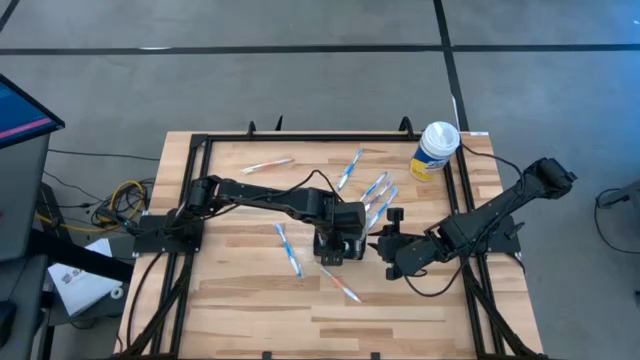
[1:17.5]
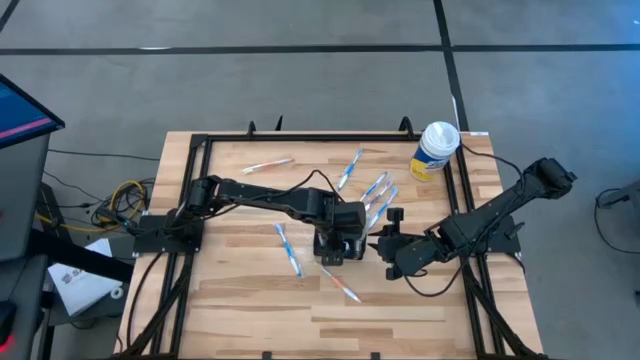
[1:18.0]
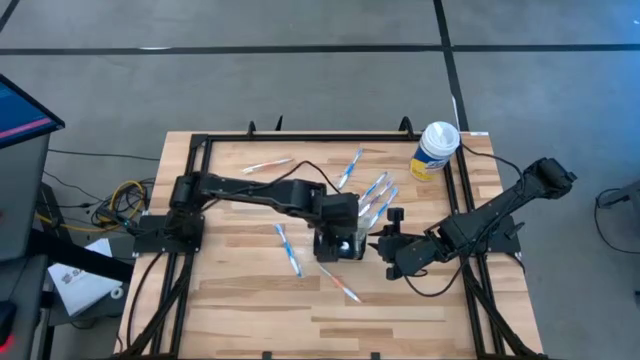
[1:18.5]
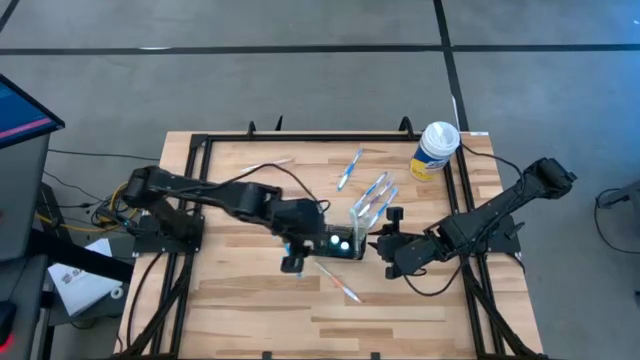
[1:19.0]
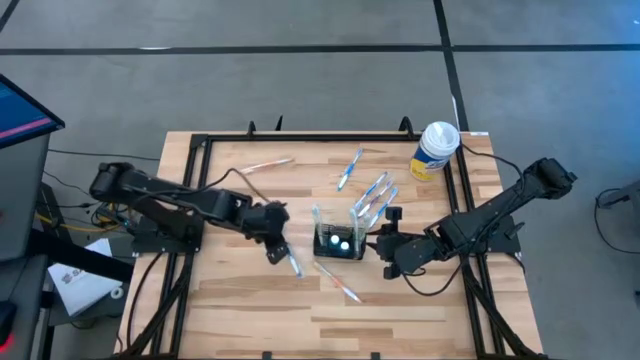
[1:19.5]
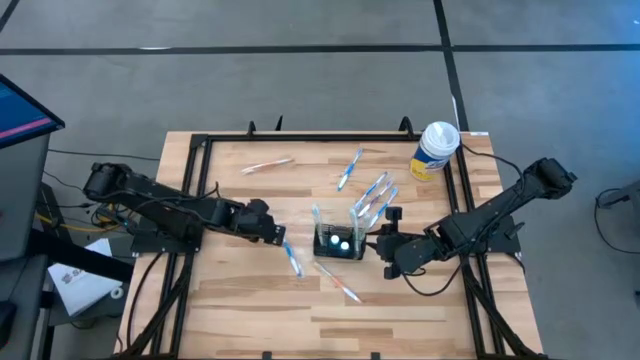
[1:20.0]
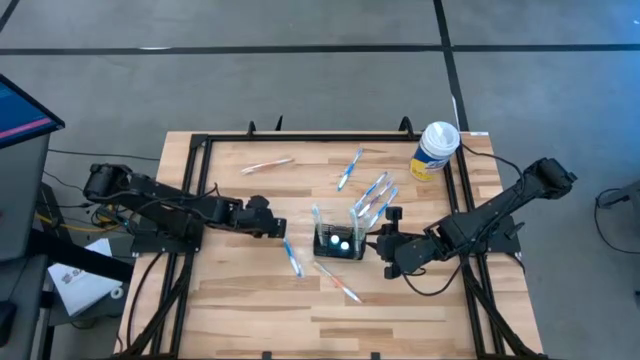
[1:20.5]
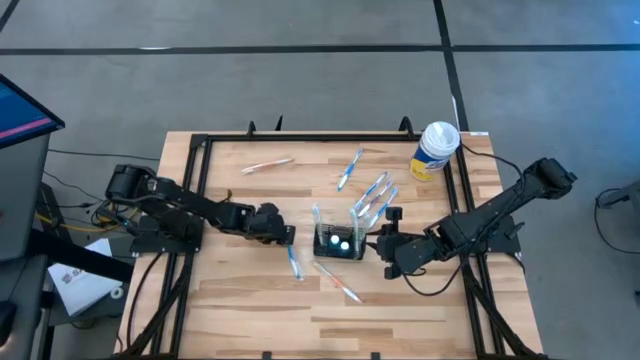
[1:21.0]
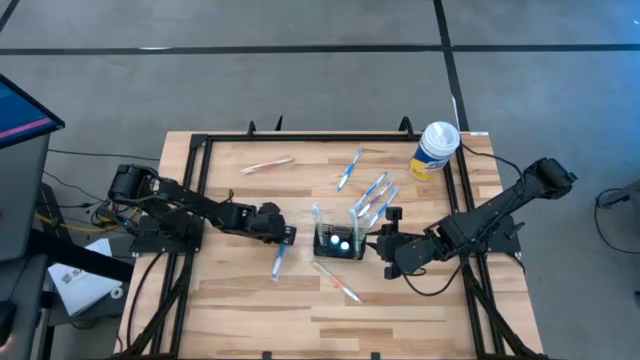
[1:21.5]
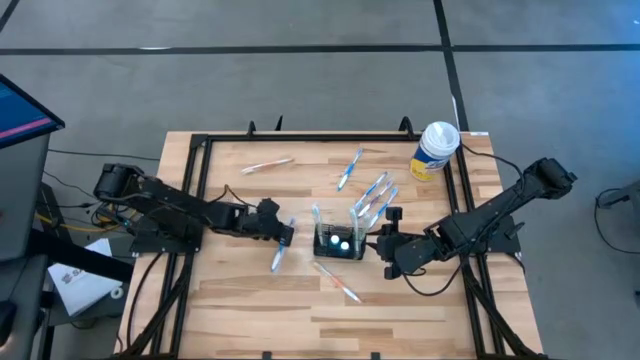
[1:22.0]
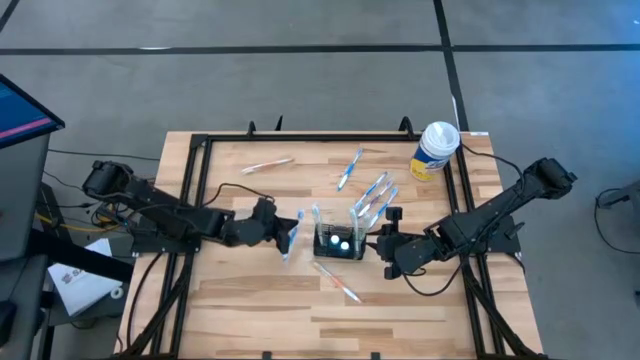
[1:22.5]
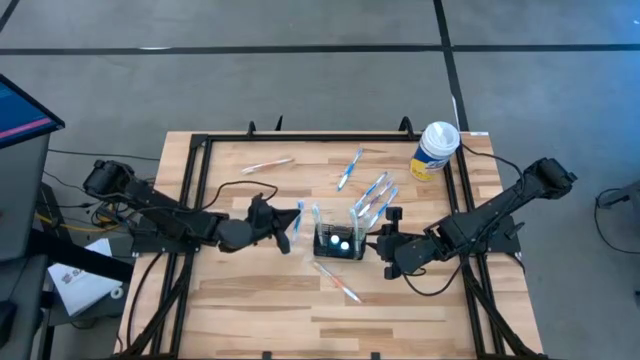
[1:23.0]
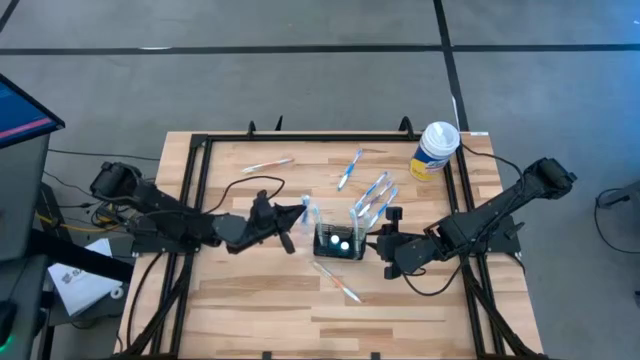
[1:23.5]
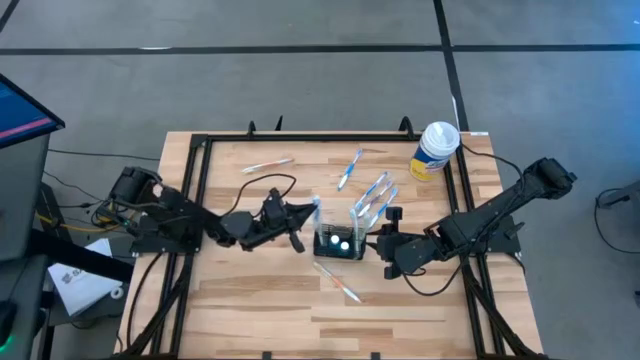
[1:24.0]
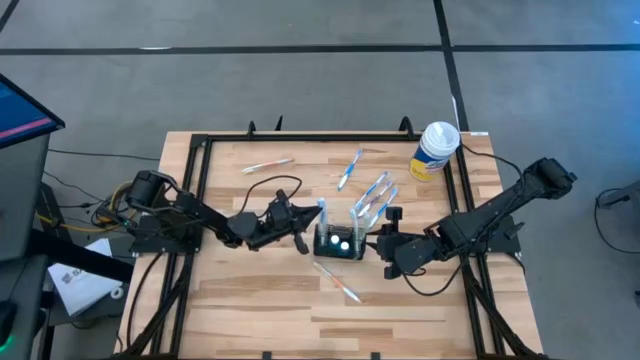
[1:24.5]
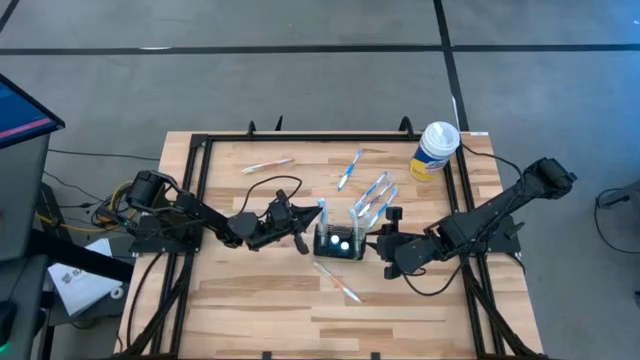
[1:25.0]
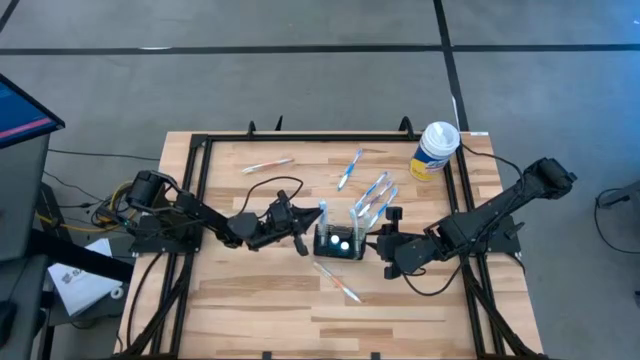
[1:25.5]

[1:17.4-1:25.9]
Task: Pick & Place toothbrushing station
Put the blue toothbrush into the wire organizer

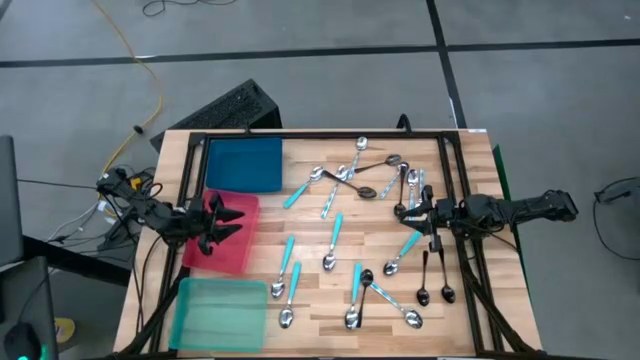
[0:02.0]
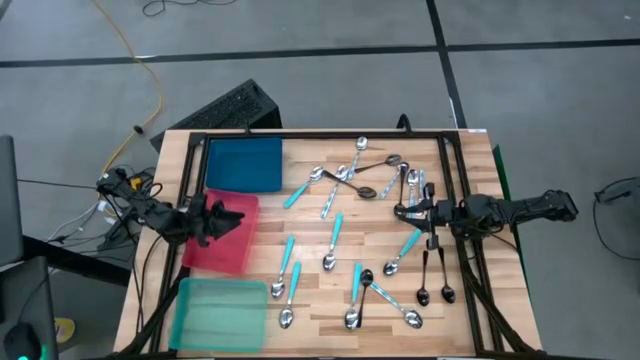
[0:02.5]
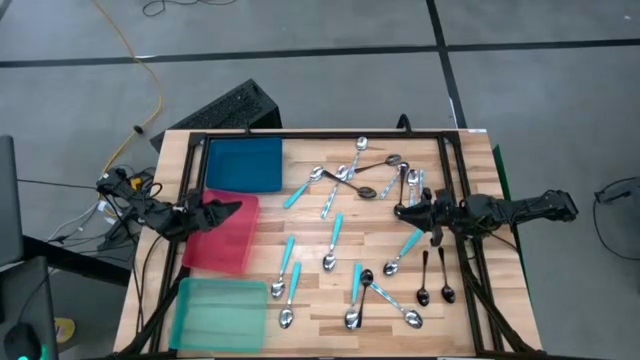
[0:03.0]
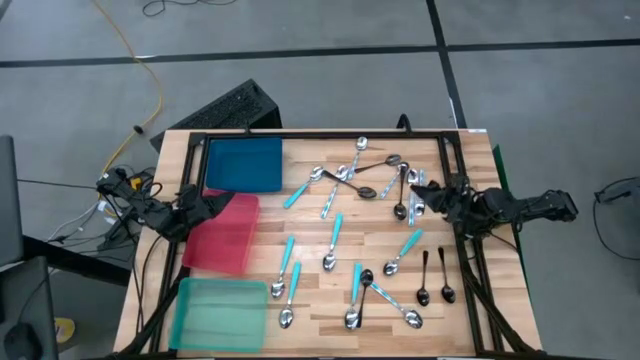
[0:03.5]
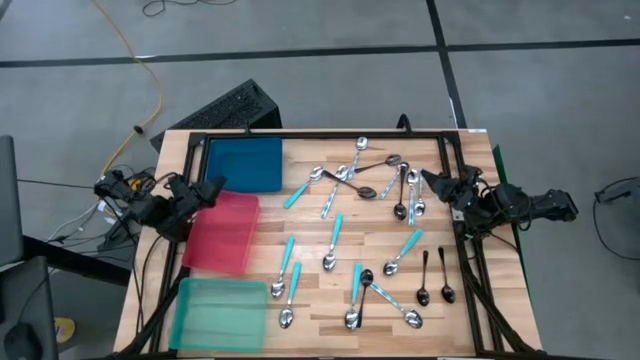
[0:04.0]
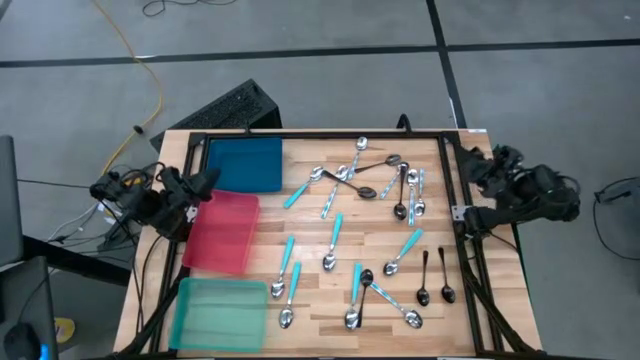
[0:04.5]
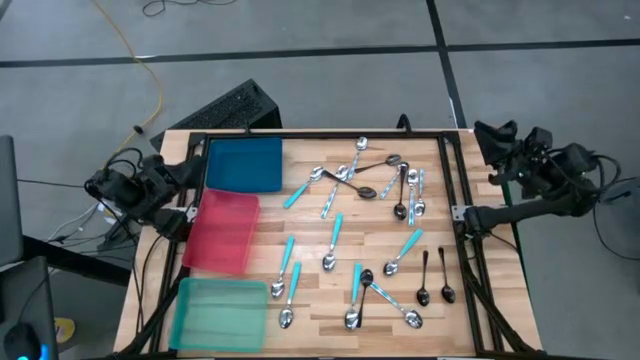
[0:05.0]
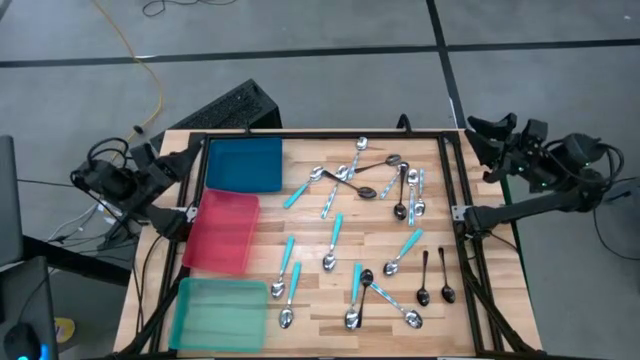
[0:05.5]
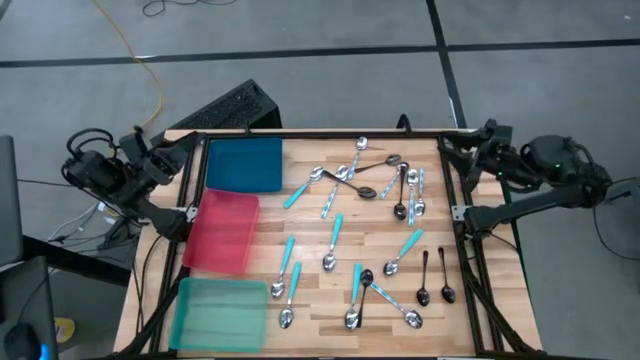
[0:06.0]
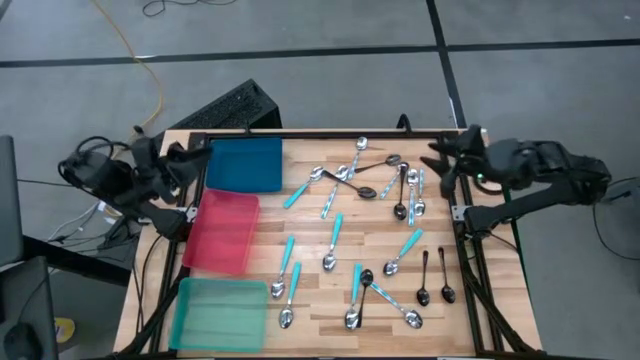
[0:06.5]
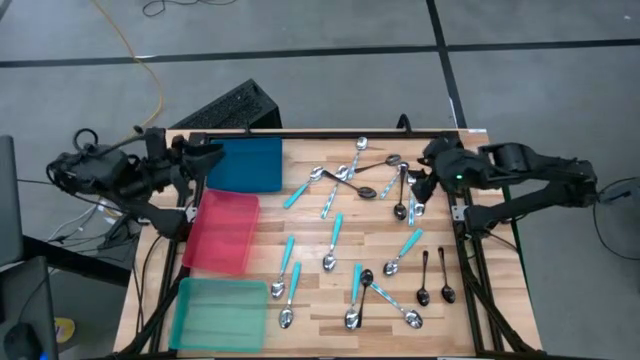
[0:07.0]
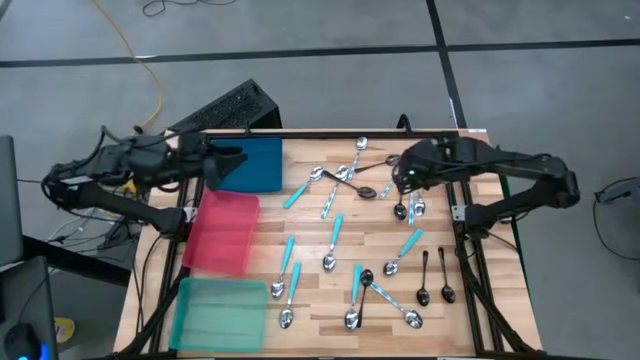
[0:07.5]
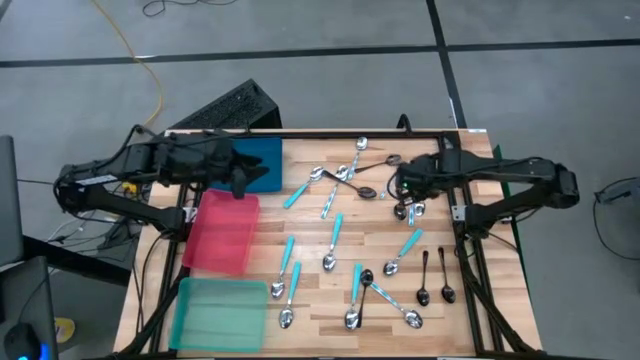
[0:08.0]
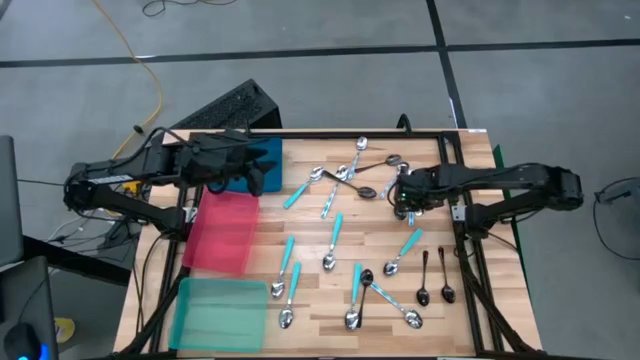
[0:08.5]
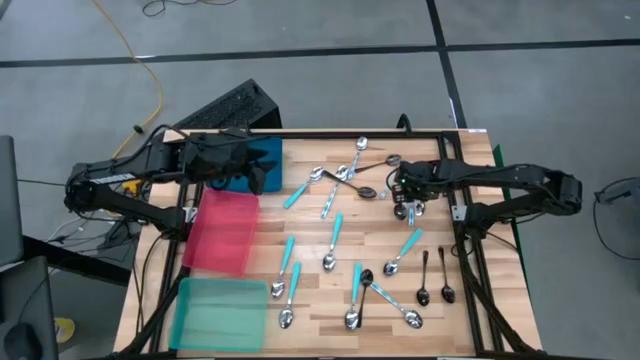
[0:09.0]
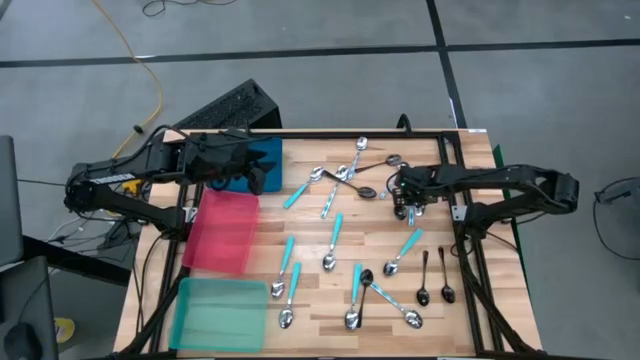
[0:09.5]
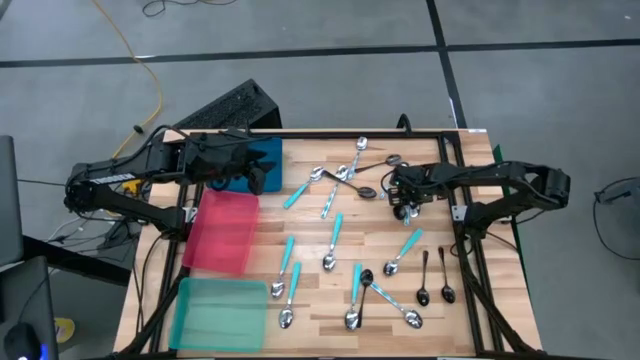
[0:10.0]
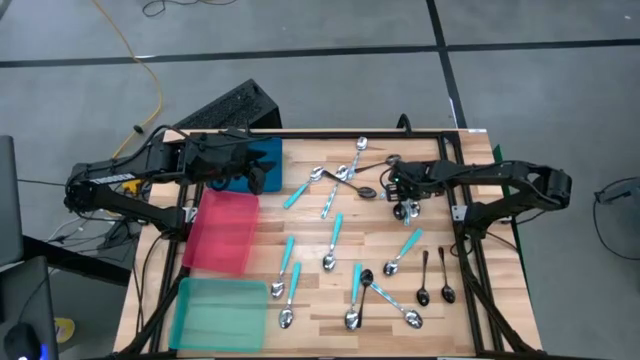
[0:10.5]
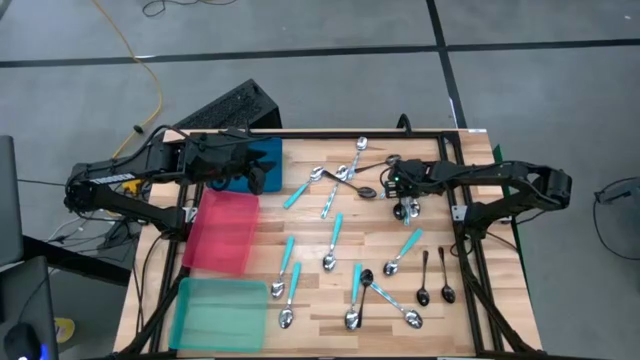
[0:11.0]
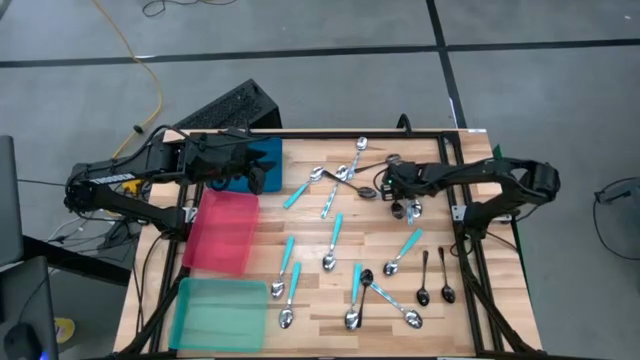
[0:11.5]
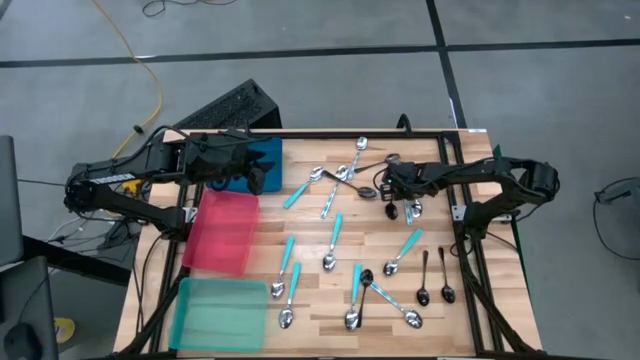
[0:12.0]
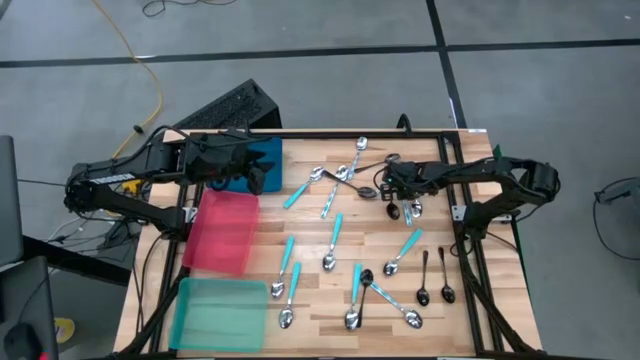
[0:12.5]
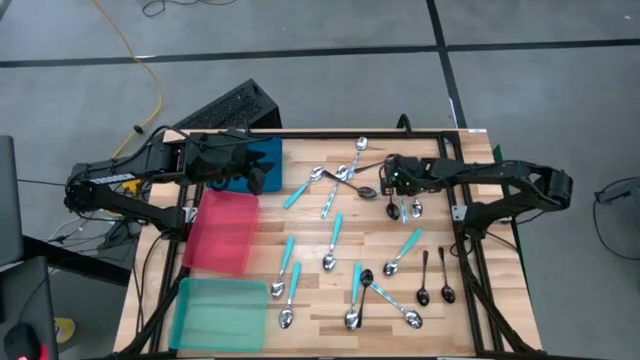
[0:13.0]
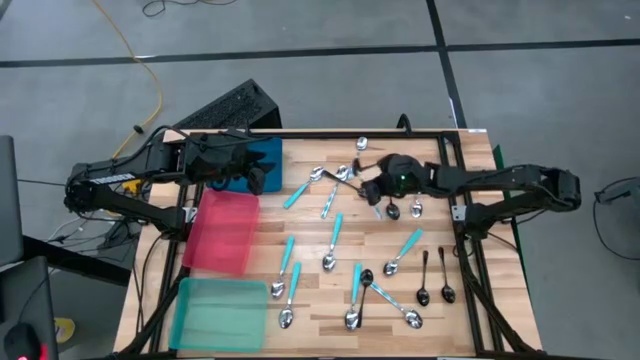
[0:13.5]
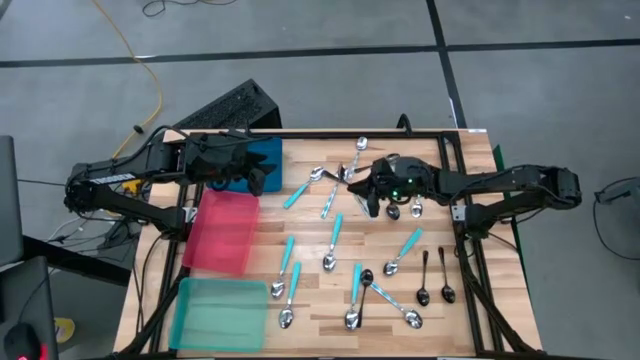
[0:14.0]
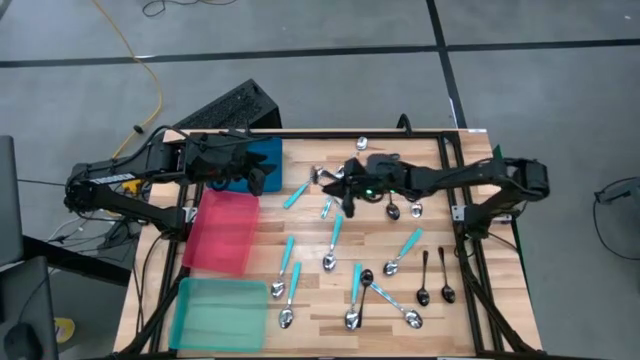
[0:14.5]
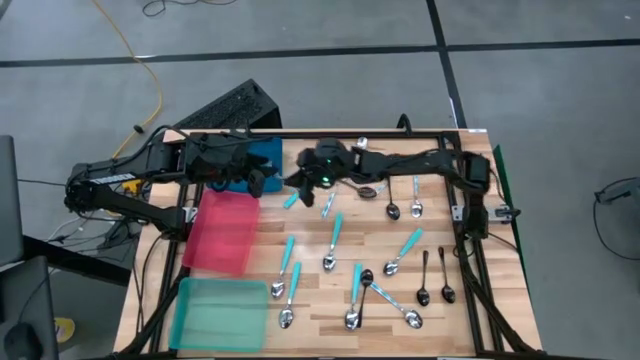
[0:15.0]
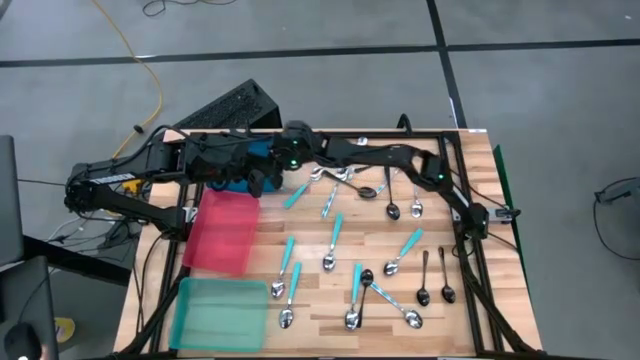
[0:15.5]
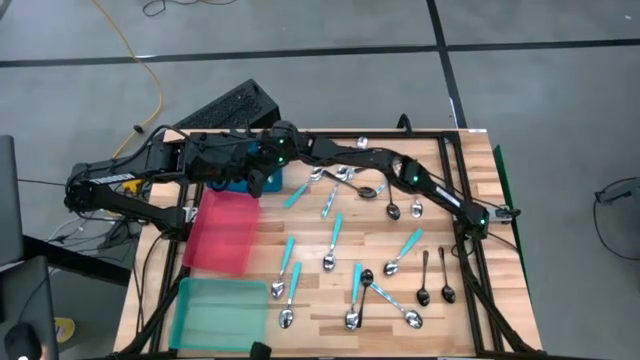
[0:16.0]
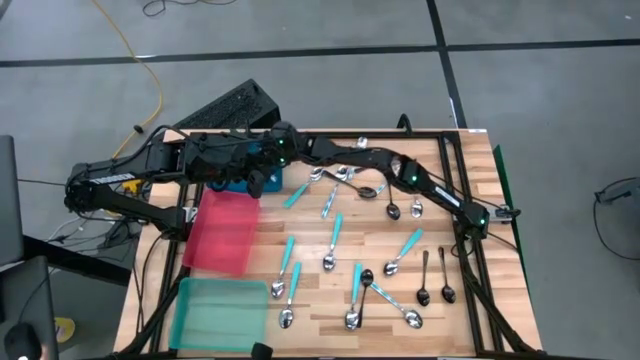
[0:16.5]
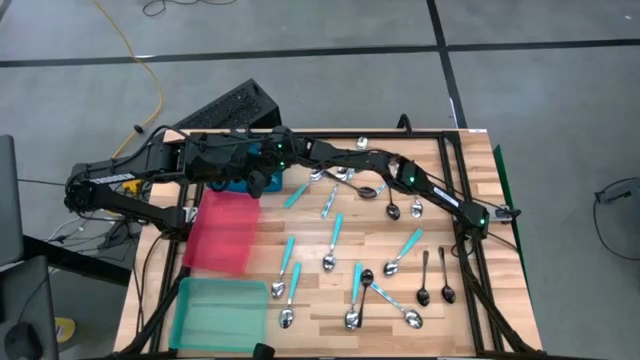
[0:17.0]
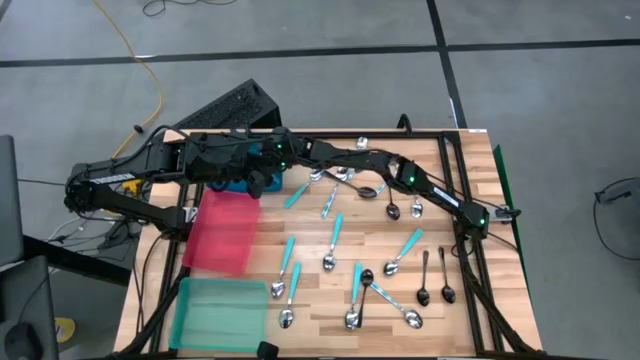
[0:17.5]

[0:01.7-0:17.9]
Task: Sort silverware by color (type)
Put the blue patterned spoon into the blue bin
